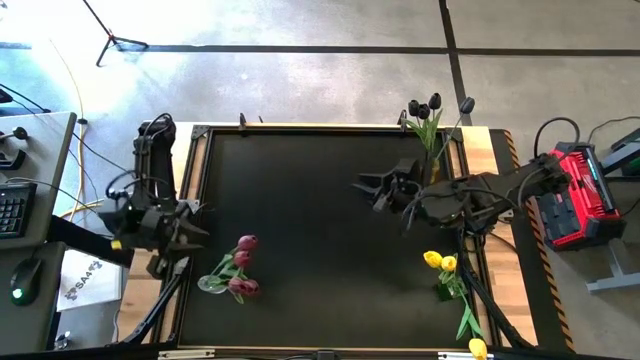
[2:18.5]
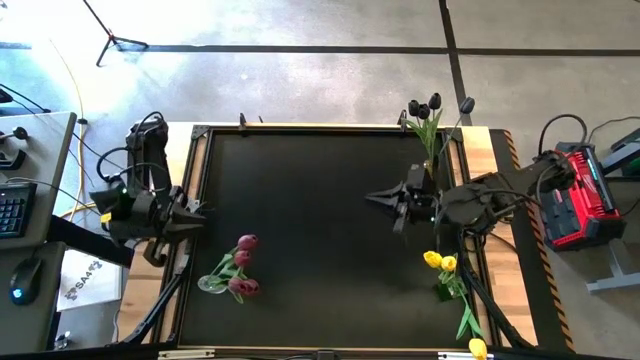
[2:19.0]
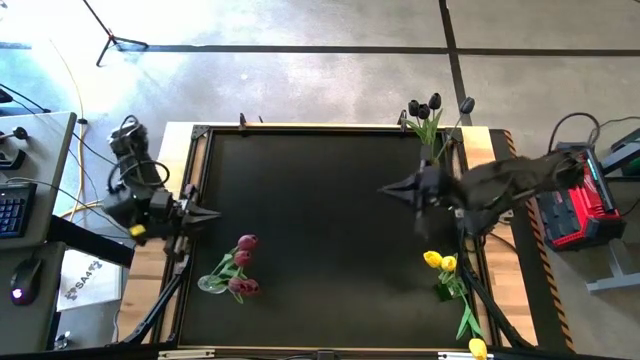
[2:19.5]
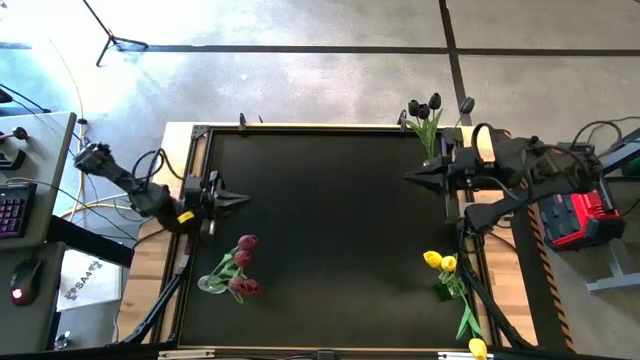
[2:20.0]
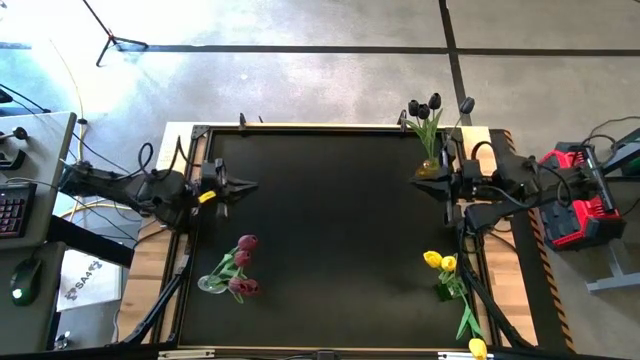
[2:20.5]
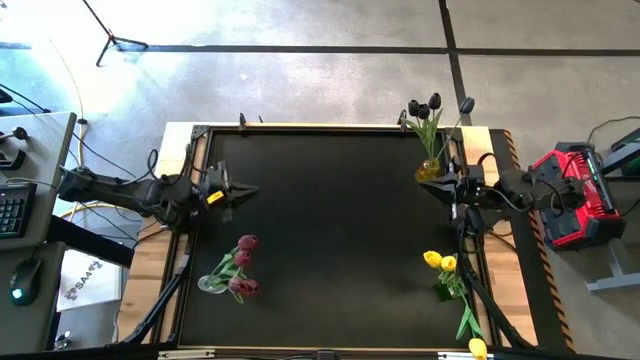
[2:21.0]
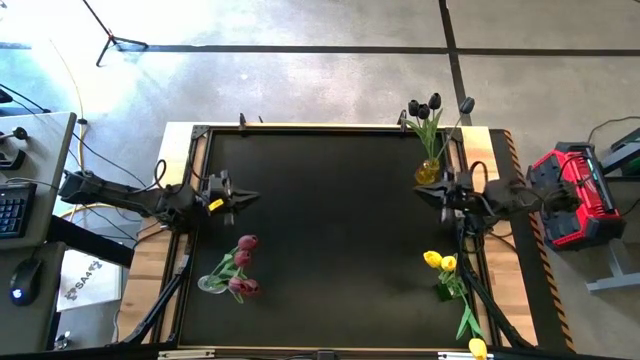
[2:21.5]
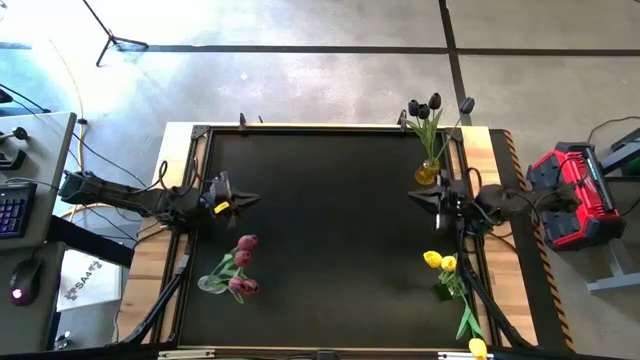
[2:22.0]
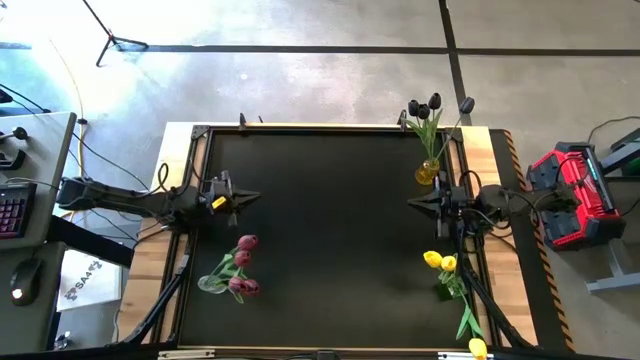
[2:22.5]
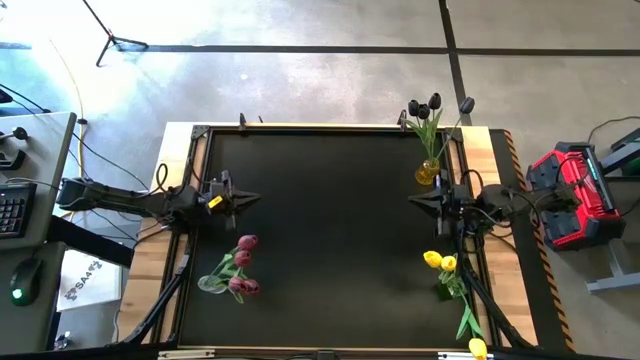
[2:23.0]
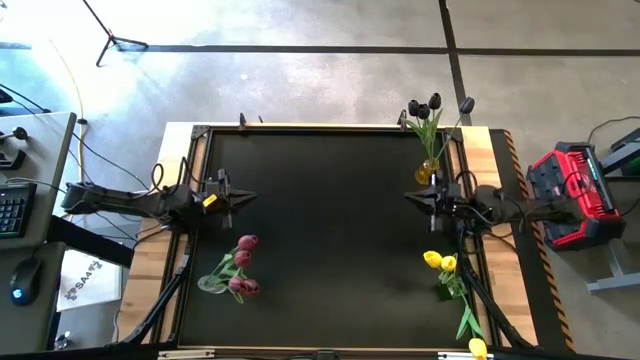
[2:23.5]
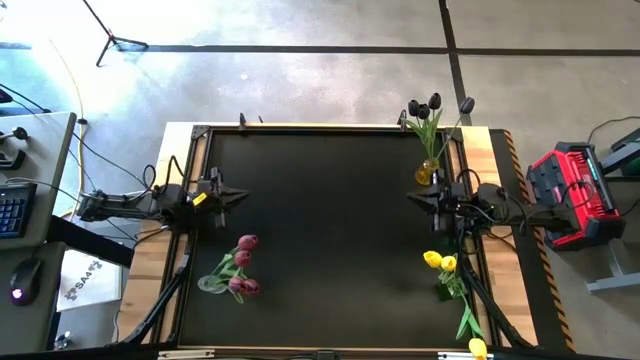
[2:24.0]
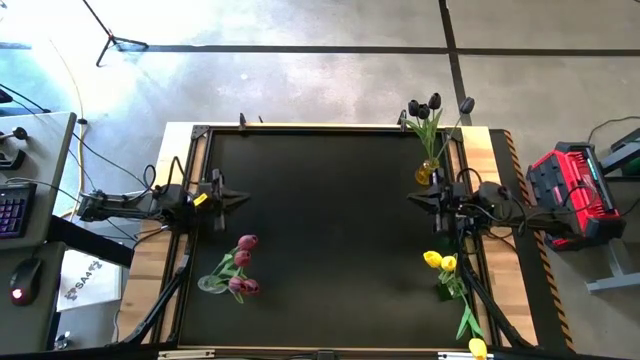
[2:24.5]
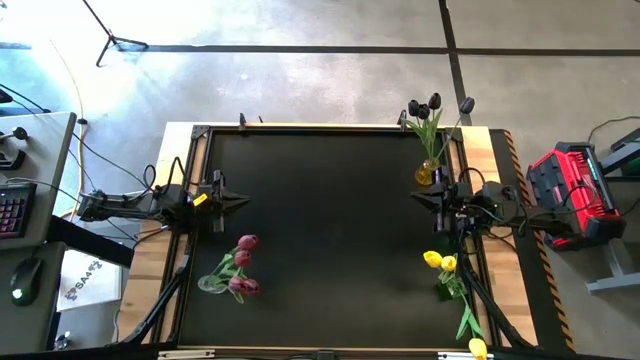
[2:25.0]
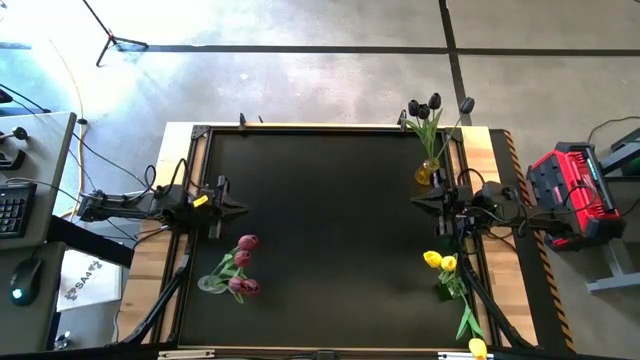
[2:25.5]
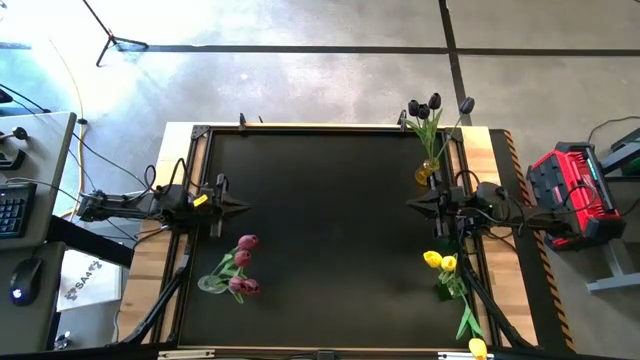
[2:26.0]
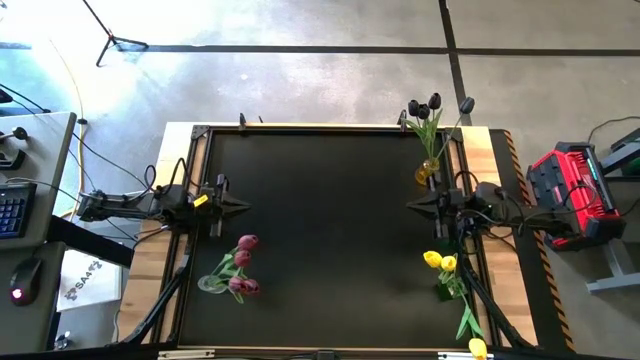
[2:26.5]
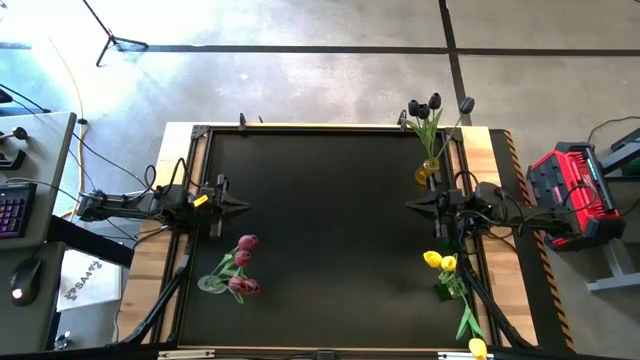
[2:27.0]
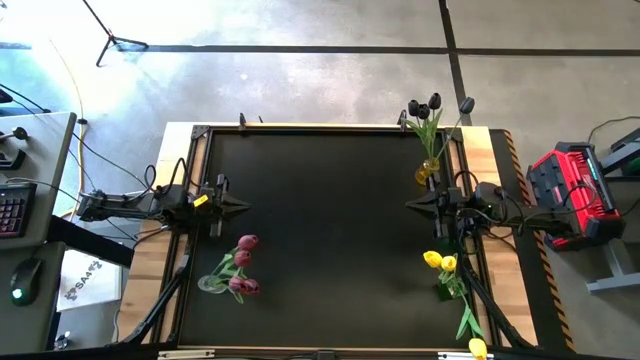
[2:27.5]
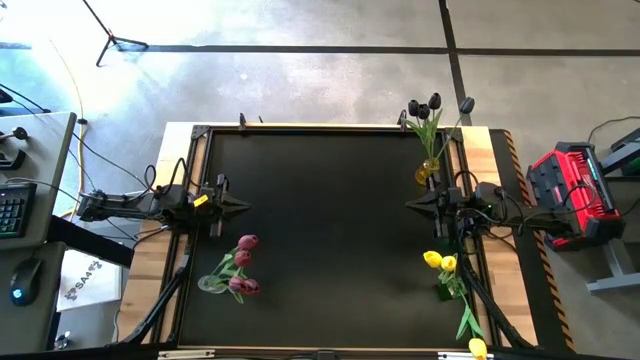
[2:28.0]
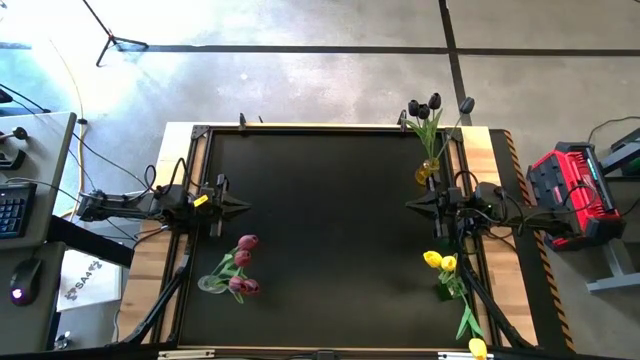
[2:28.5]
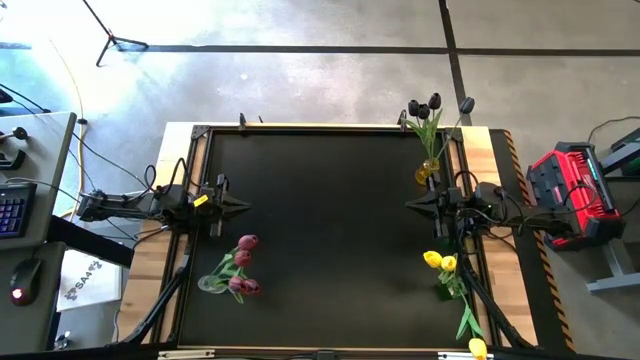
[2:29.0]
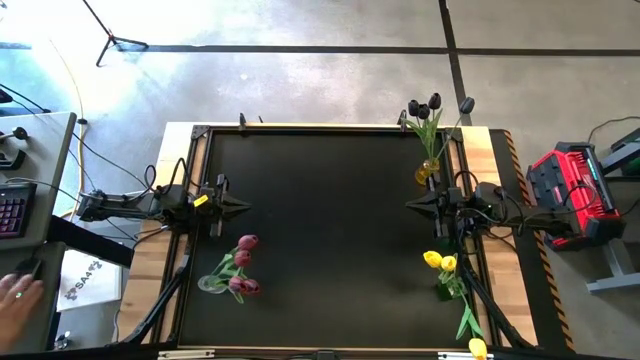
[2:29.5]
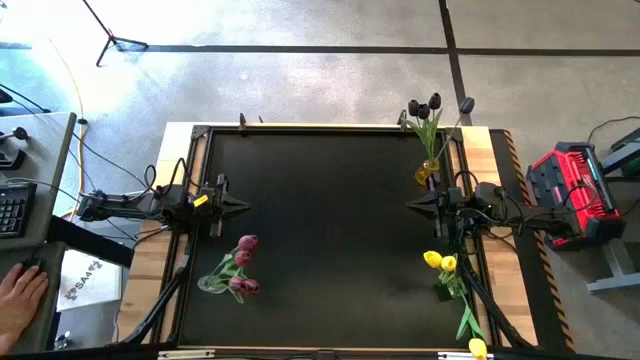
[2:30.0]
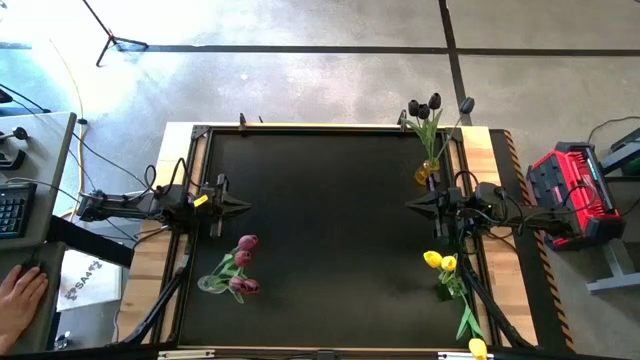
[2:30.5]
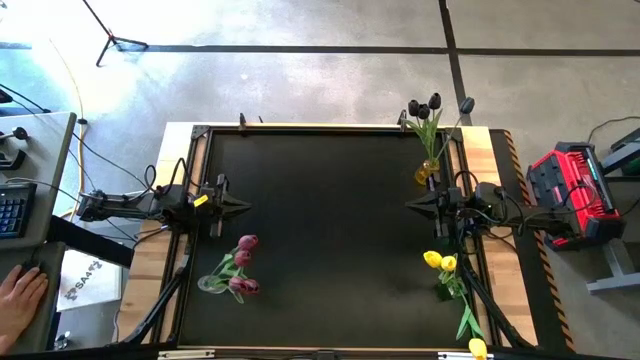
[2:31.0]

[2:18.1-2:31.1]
Task: Sort flowers into vase by color
Return to Home Position
